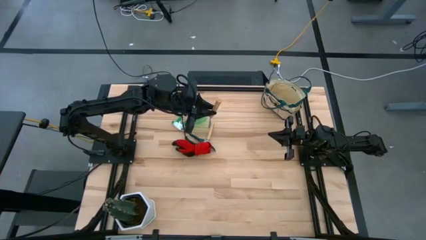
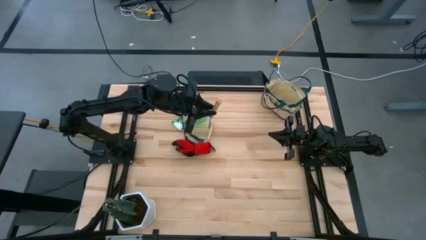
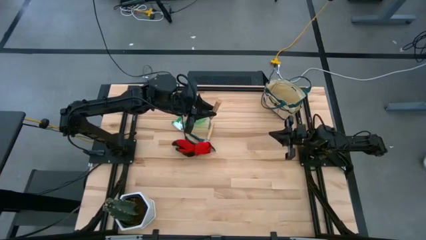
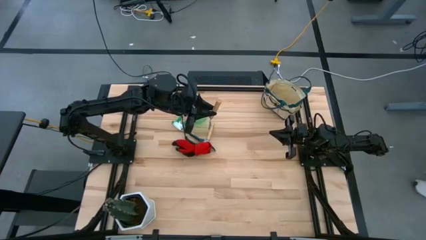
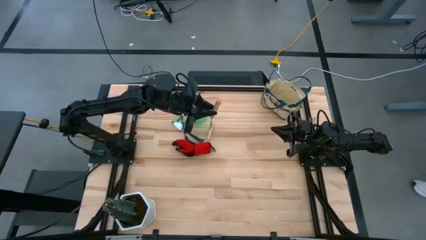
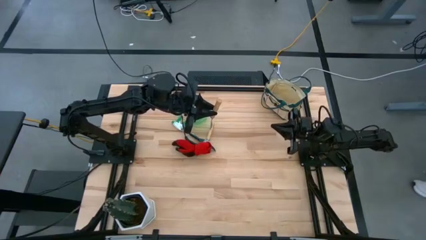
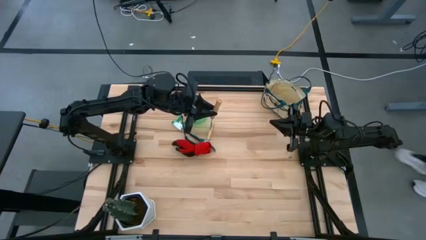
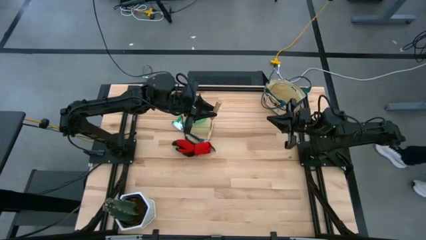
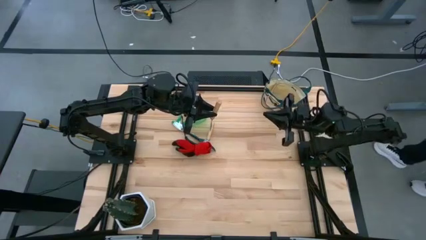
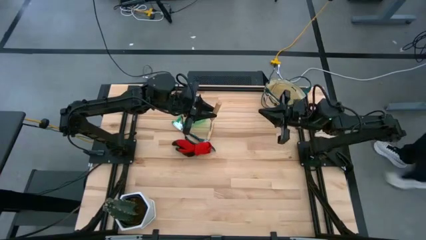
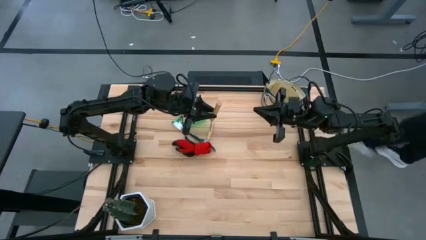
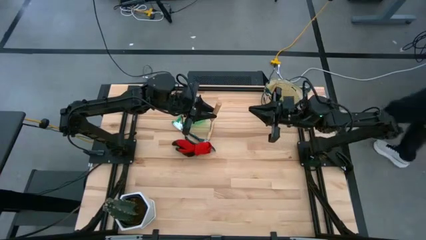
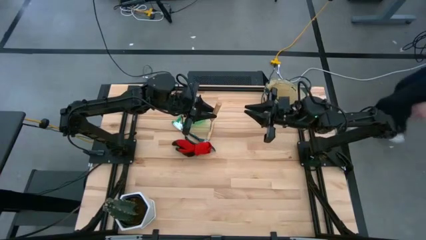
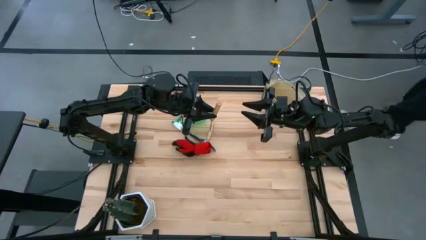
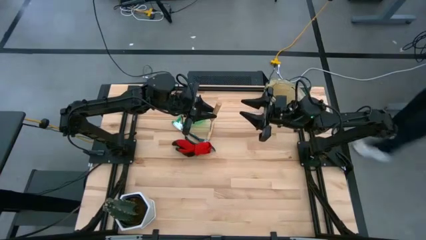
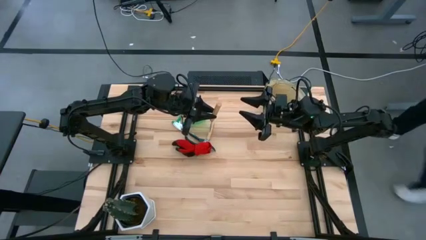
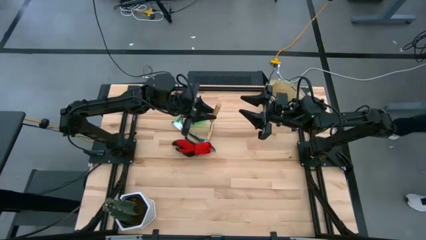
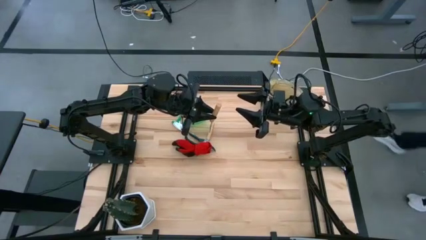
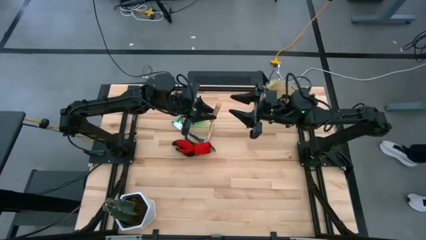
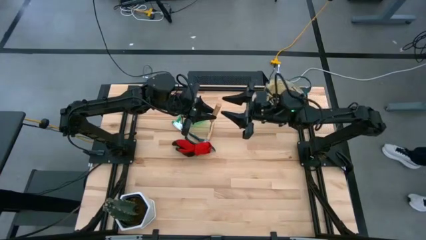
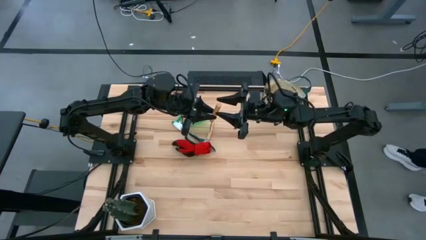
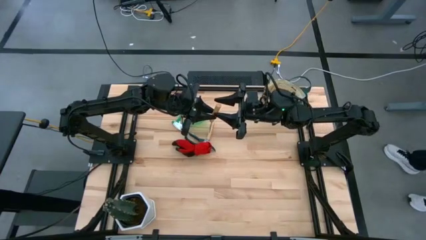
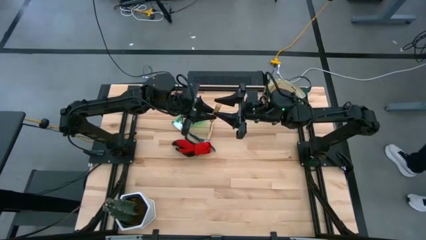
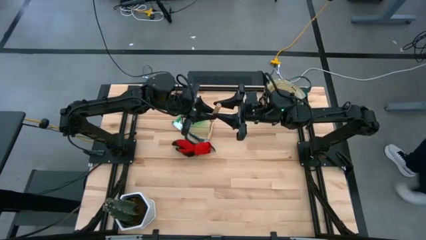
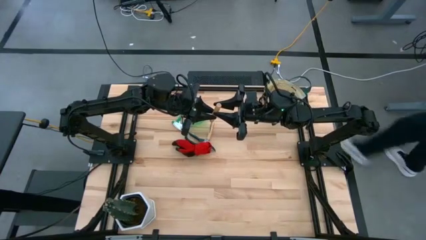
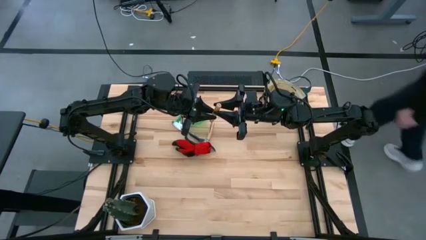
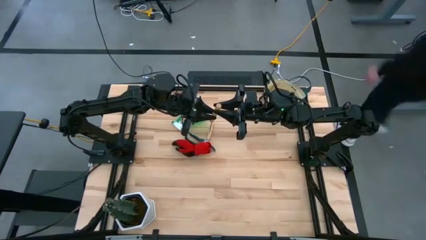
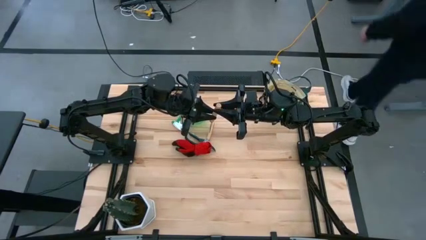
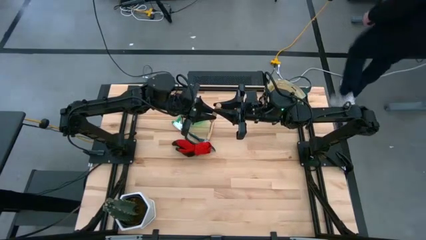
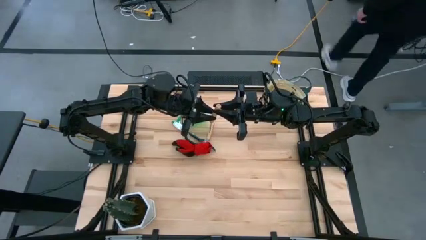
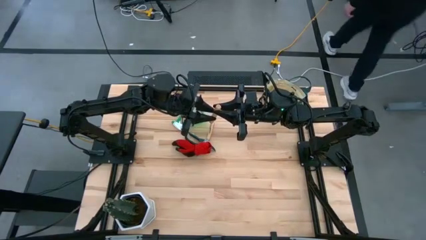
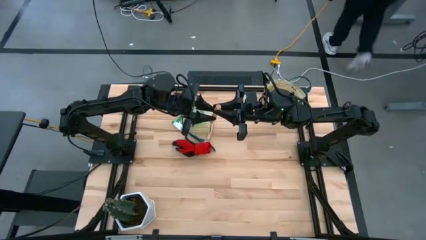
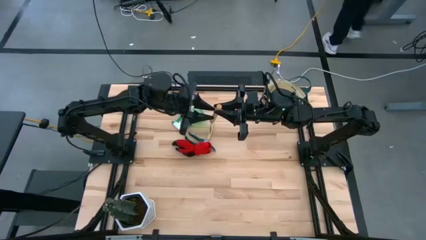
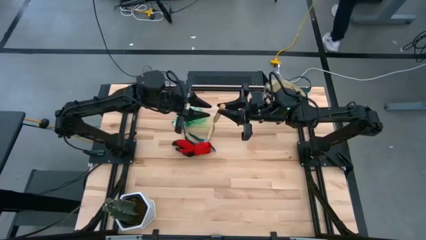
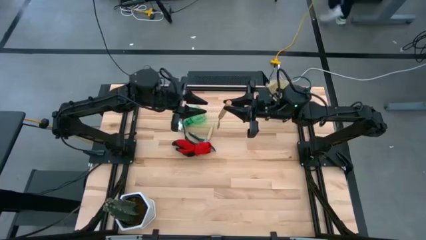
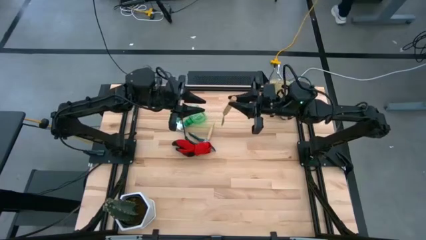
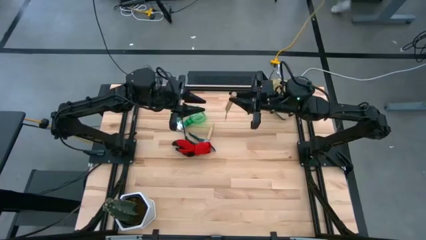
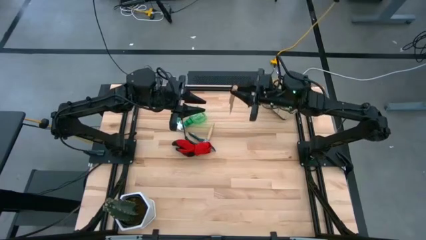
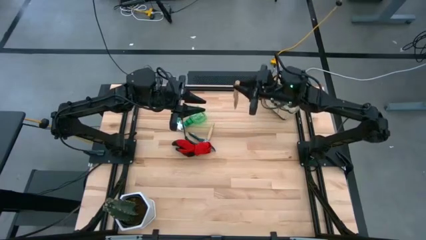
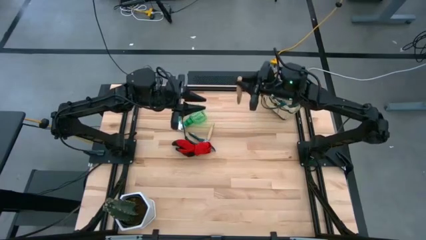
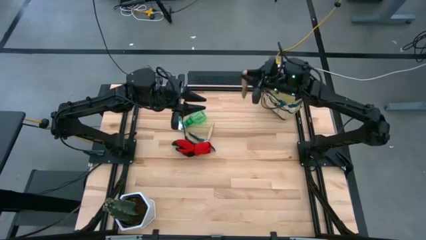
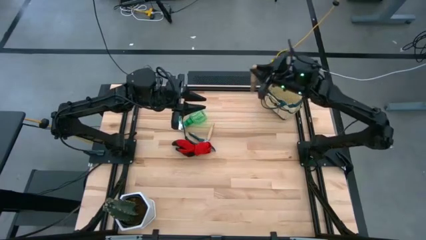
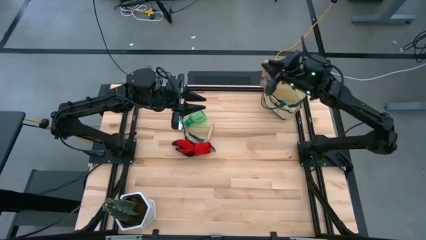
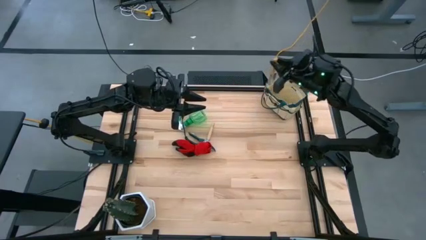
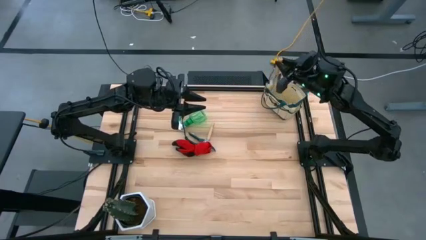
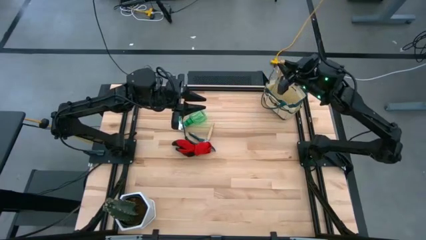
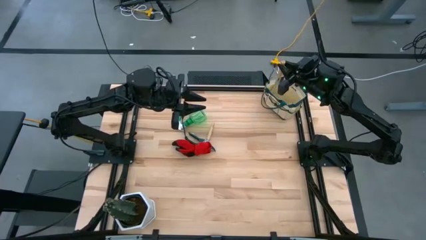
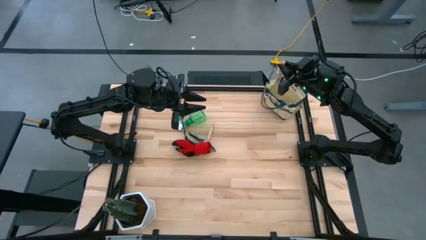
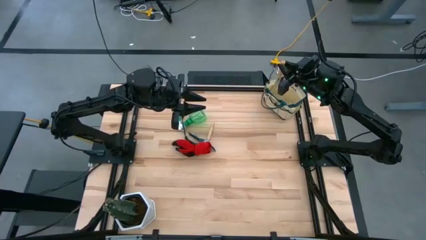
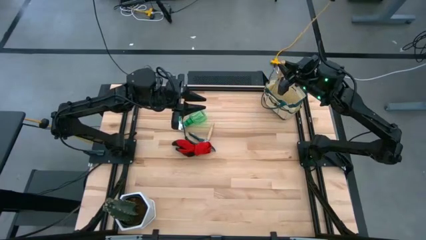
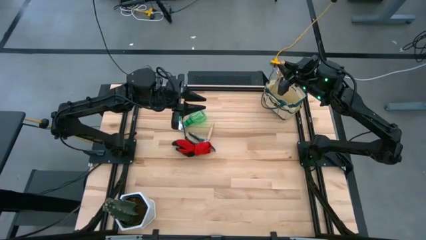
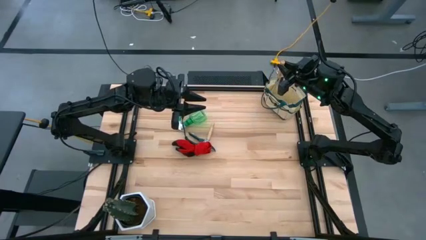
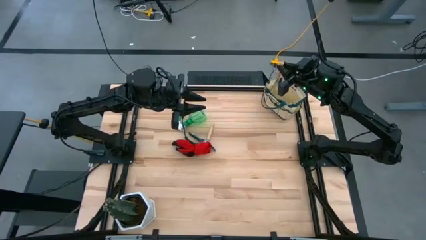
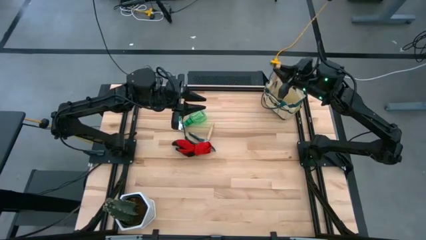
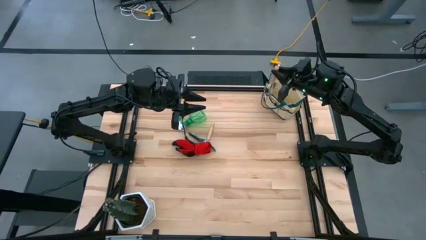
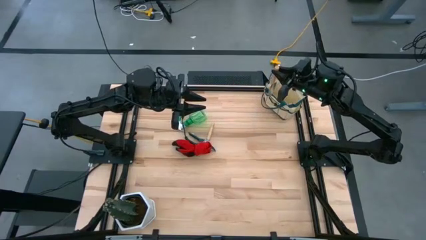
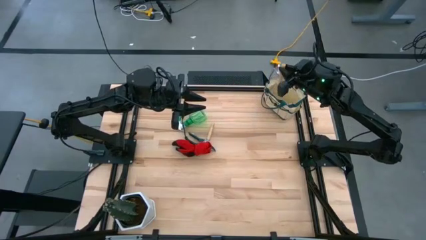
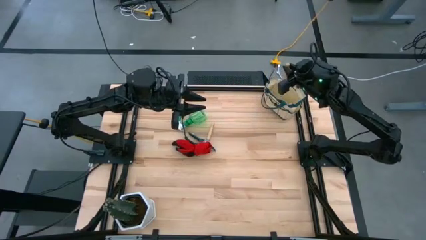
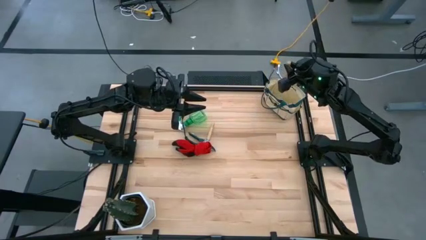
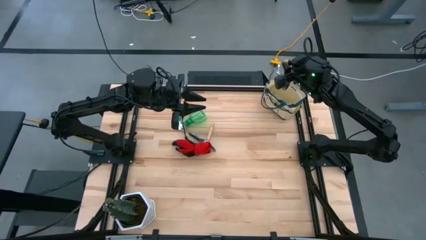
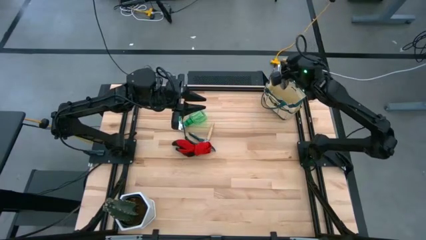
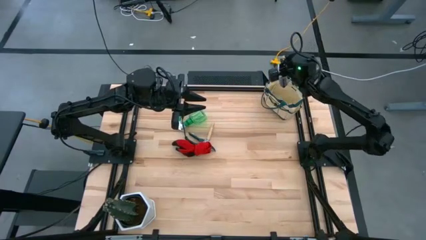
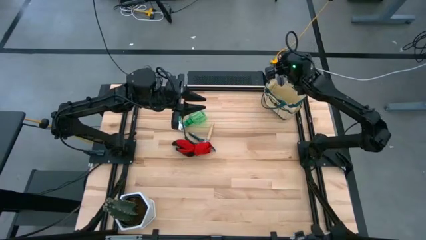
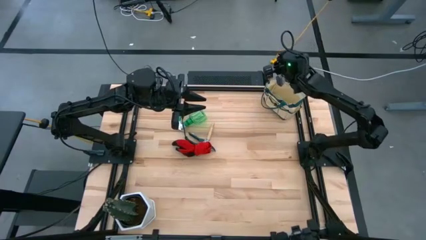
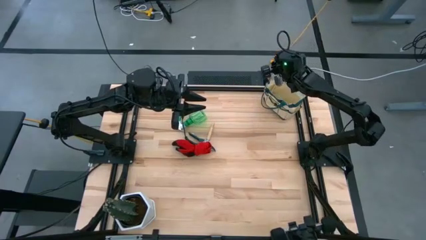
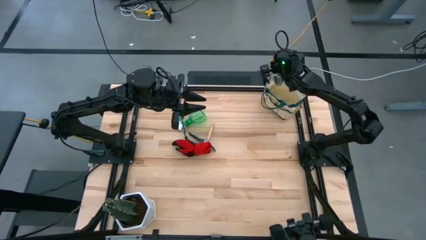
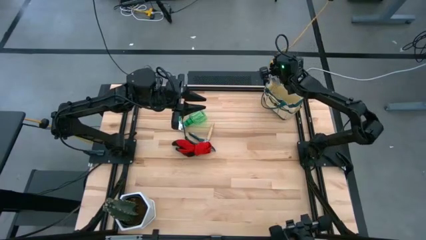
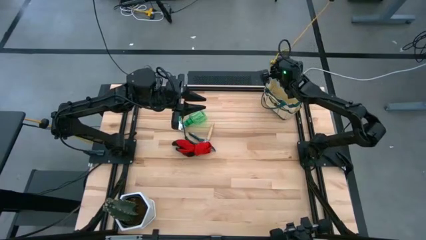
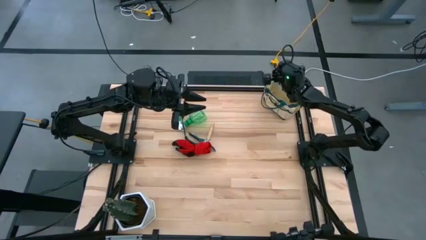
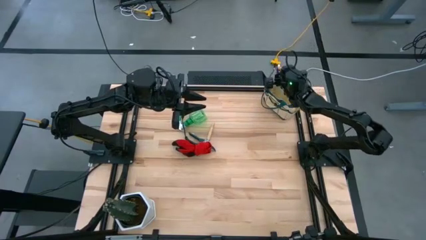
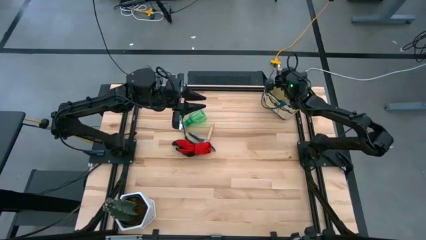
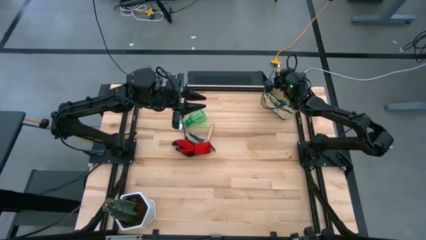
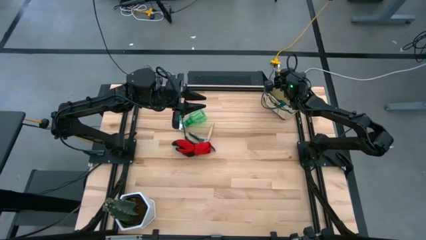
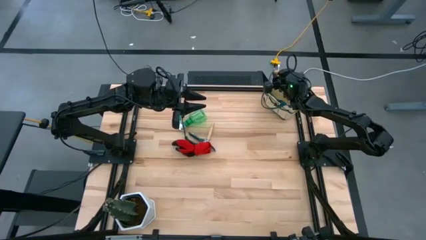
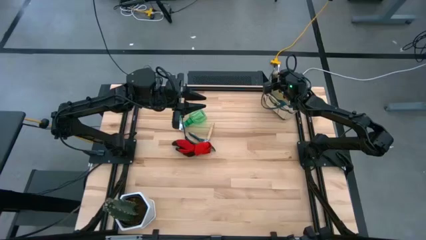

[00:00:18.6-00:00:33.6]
Task: Pick & Place Garden tools in Gardening bag
Put the left brown trowel into the gardening bag
